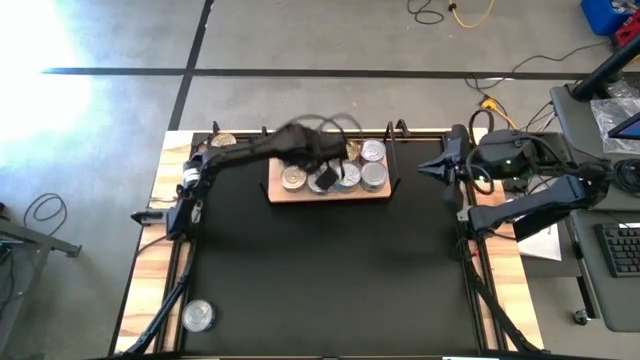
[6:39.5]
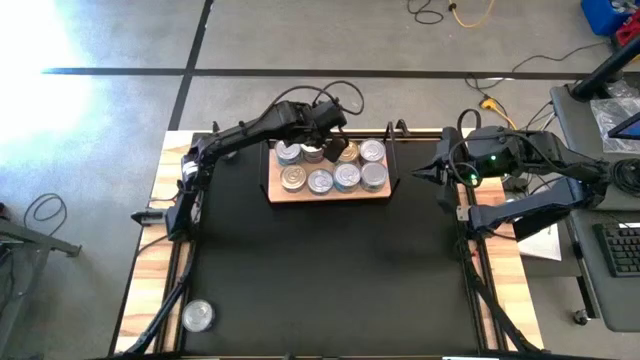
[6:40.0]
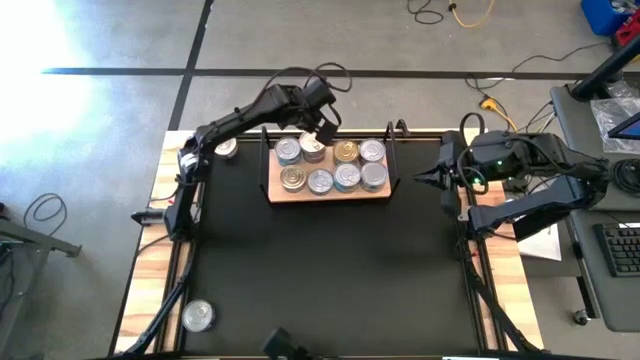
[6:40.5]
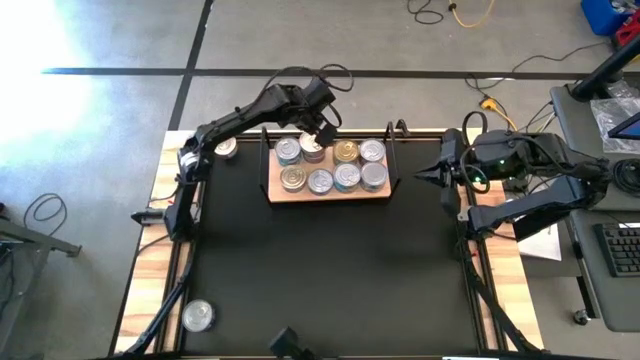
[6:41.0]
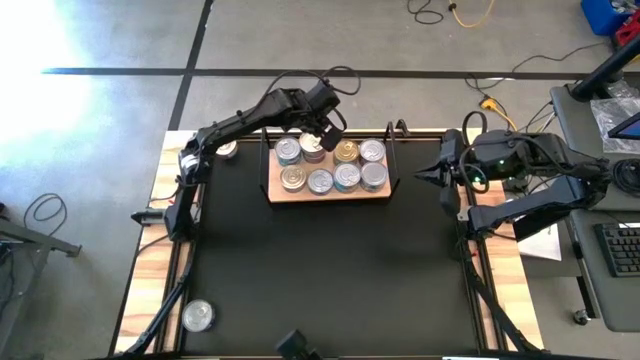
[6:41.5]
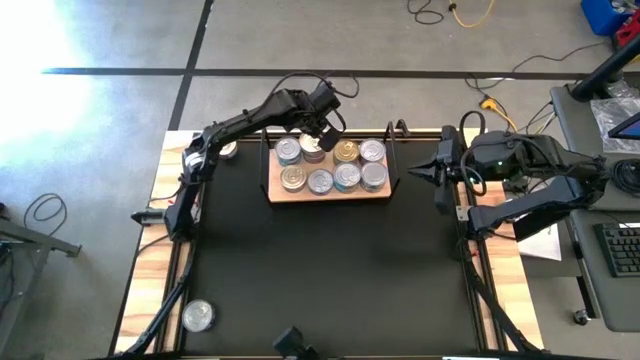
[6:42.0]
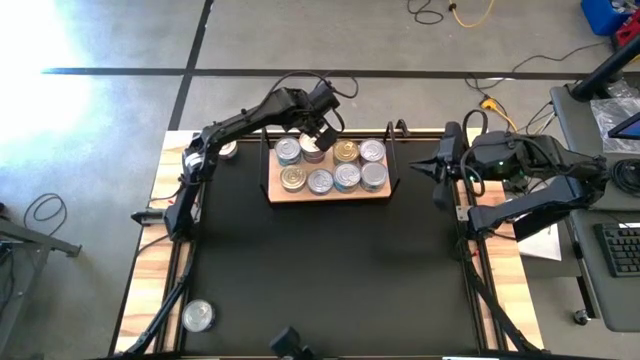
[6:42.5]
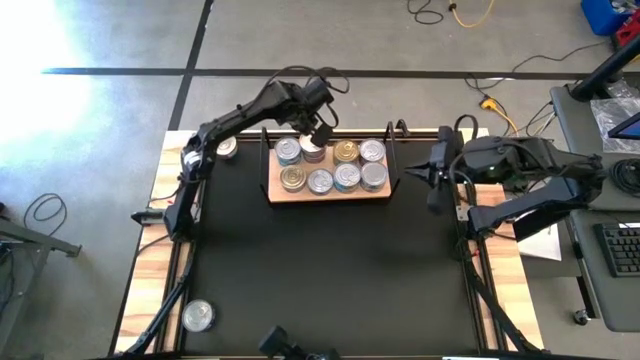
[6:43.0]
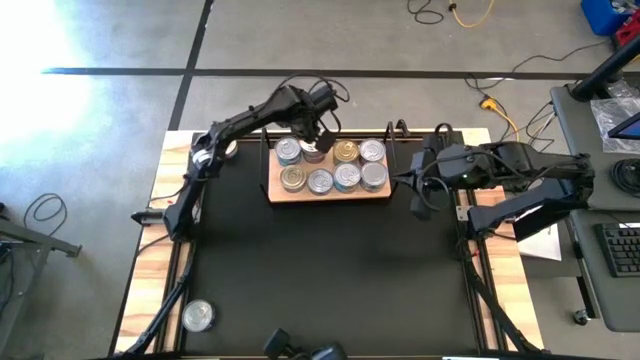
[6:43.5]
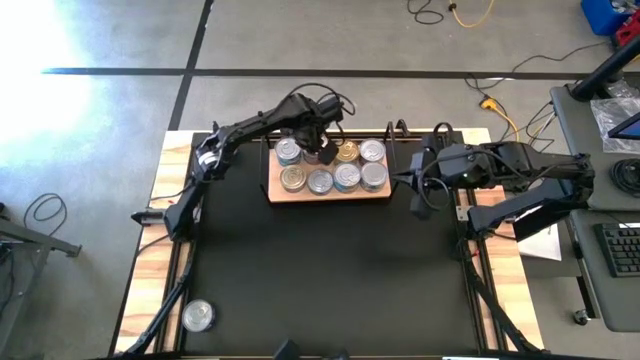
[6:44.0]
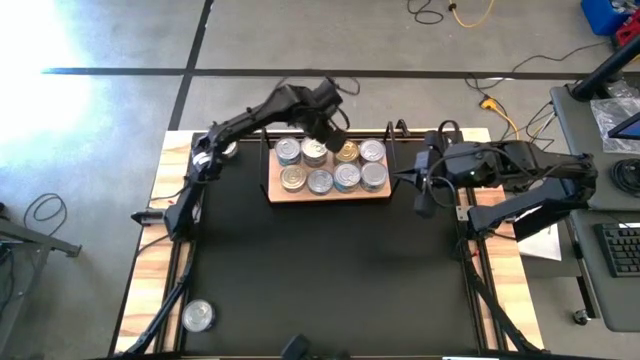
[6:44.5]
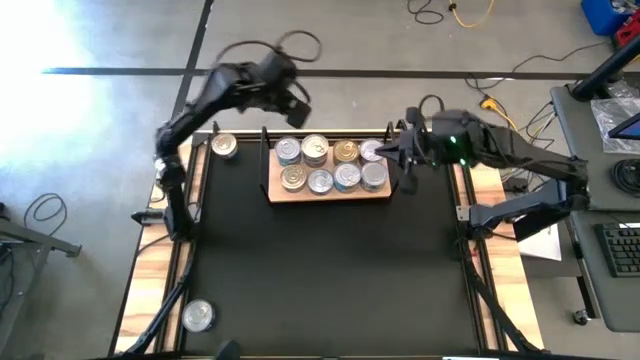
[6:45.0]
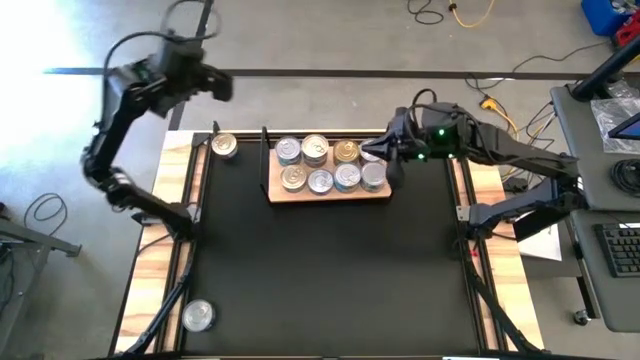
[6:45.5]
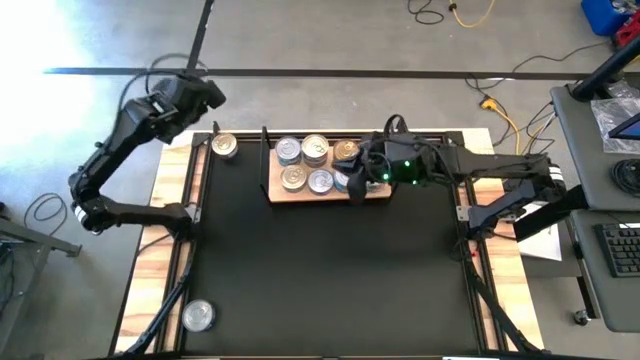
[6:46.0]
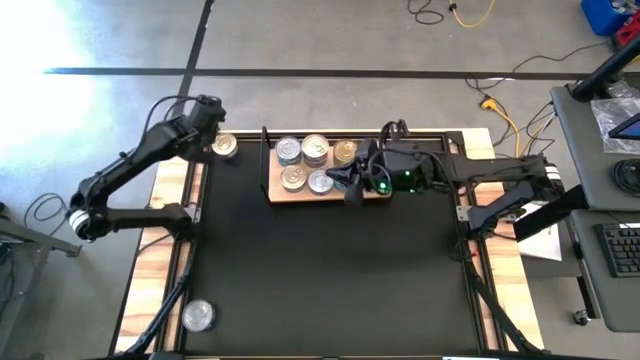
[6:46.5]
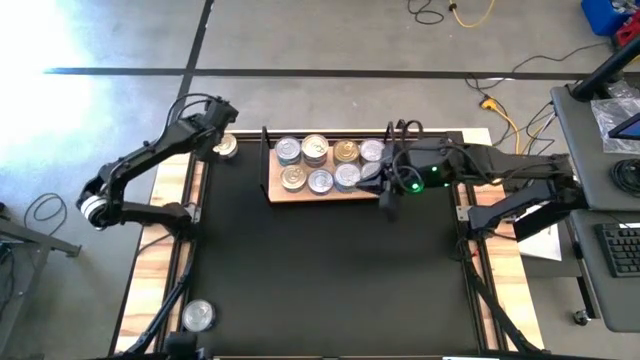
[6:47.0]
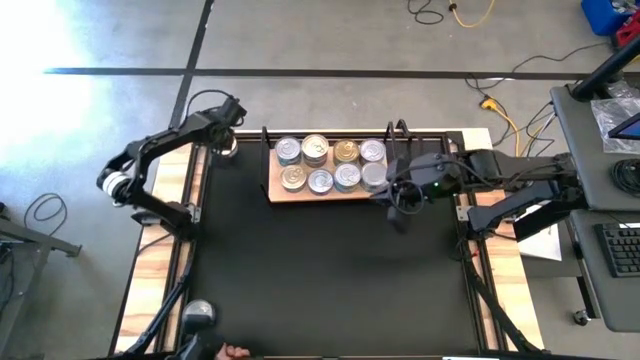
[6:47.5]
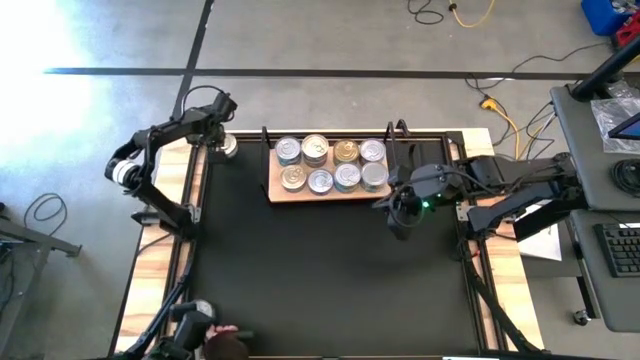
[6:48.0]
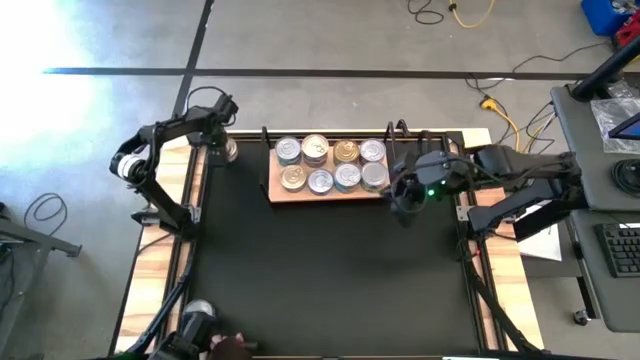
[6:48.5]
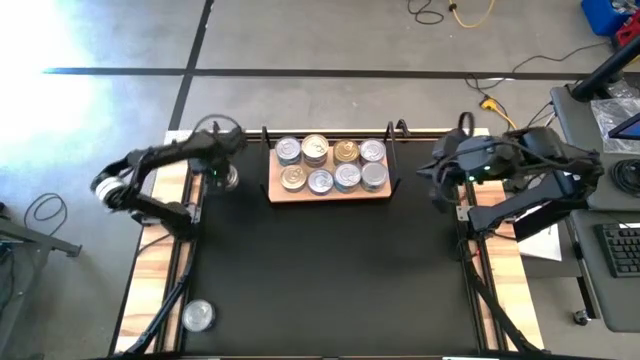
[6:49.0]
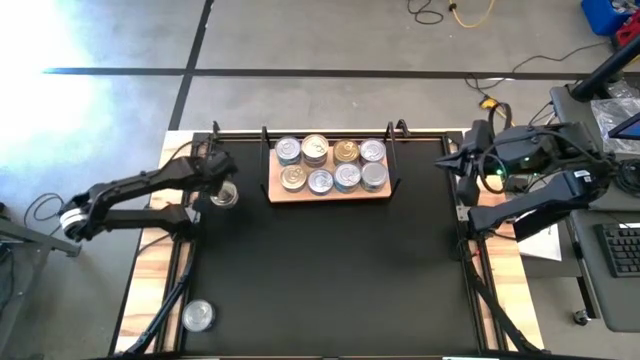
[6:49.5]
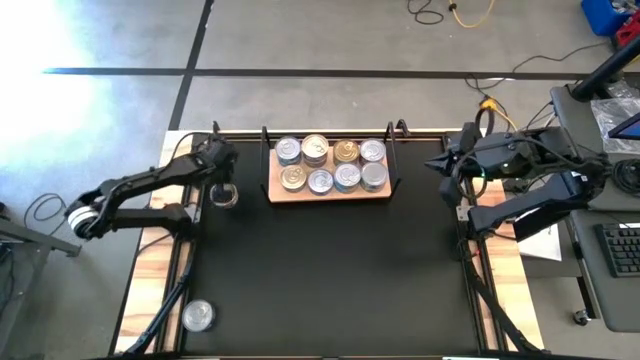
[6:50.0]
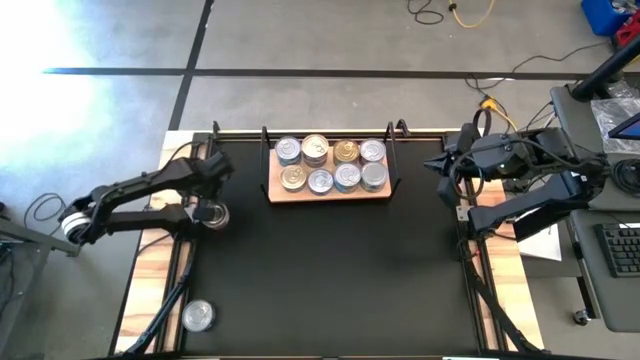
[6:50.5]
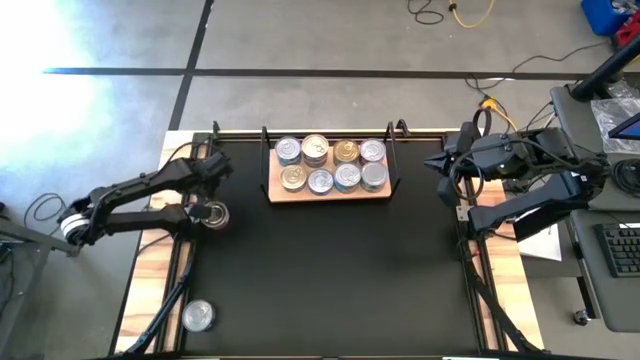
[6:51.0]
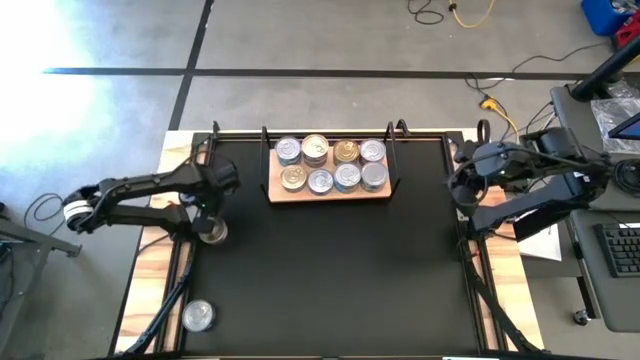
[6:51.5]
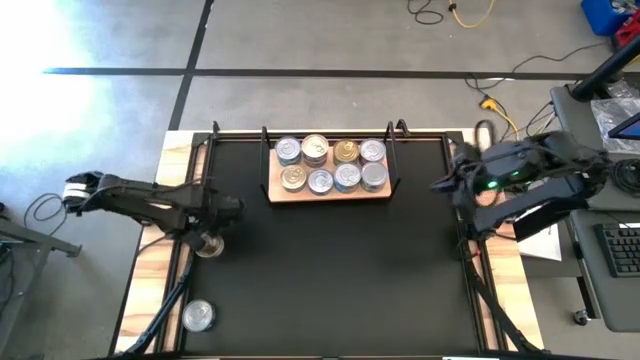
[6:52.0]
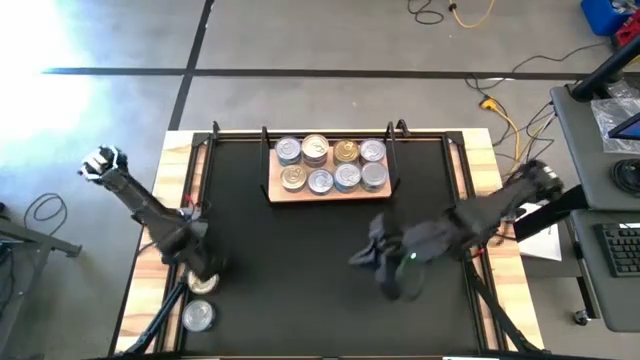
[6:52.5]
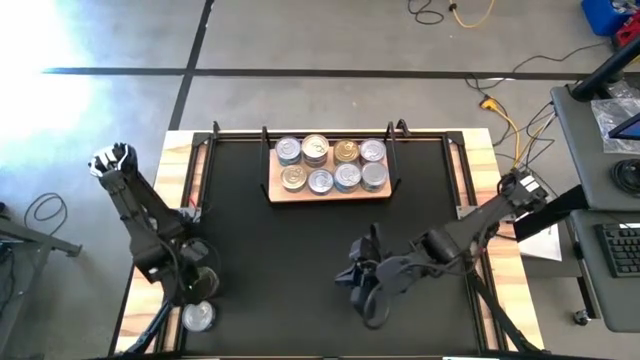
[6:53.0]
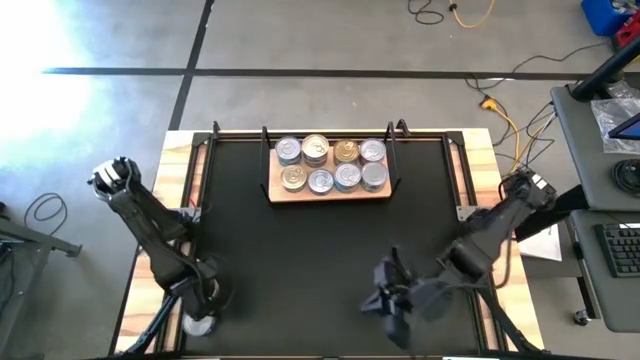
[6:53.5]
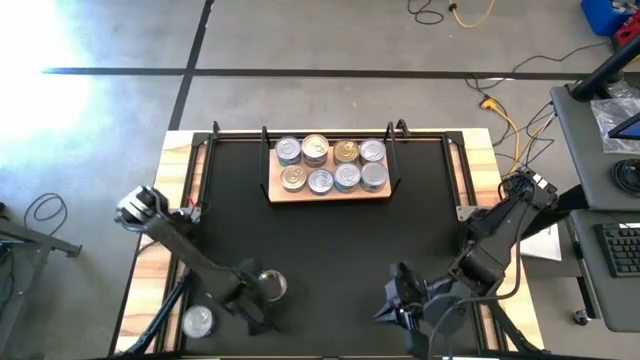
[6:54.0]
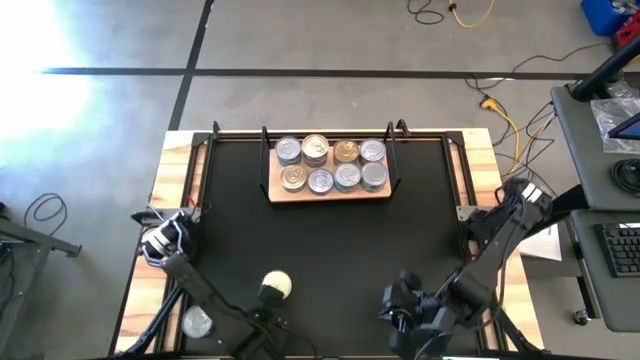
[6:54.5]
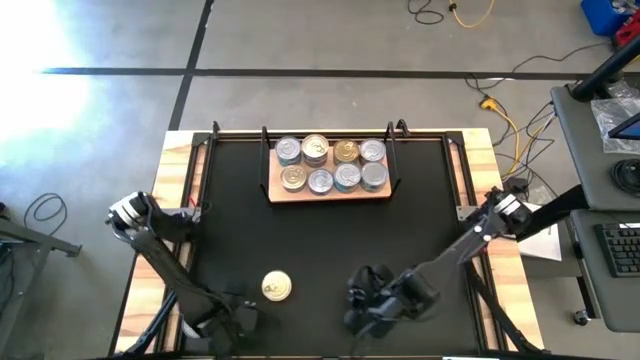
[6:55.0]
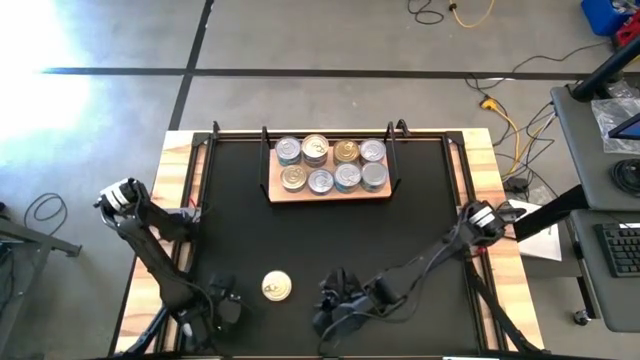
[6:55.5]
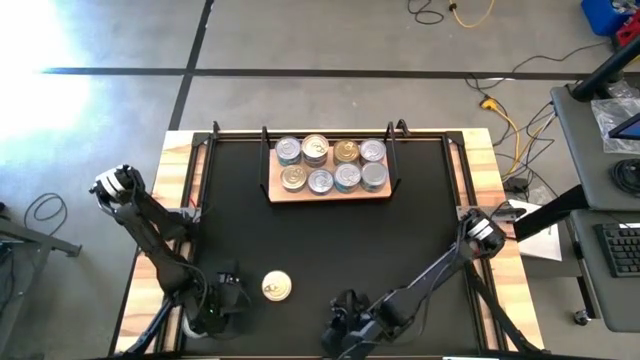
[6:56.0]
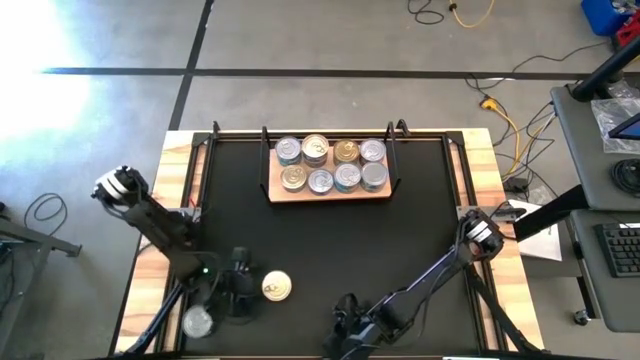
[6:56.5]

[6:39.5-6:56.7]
Task: Stack canned seafood by type on shelf
Stack the blue-pink tuna can on top of the other blue-pink tuna can on the shelf
